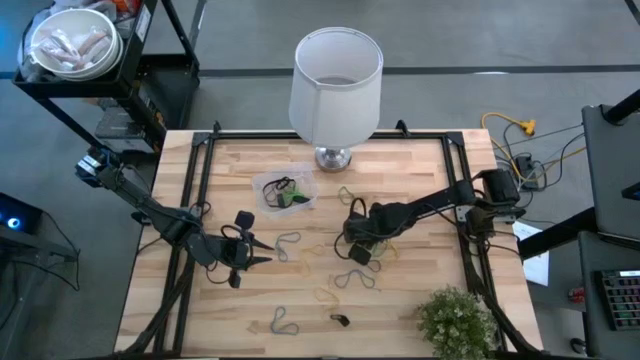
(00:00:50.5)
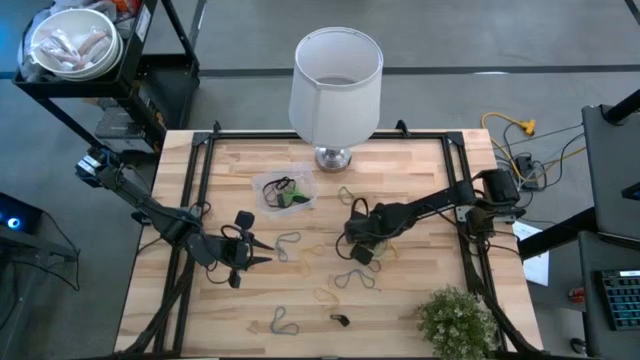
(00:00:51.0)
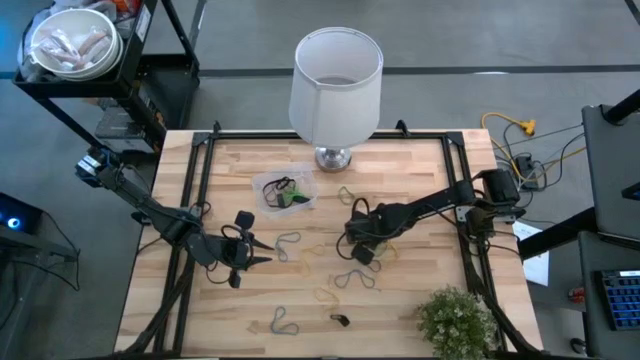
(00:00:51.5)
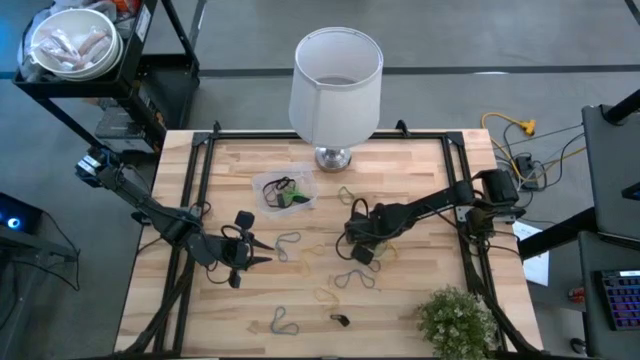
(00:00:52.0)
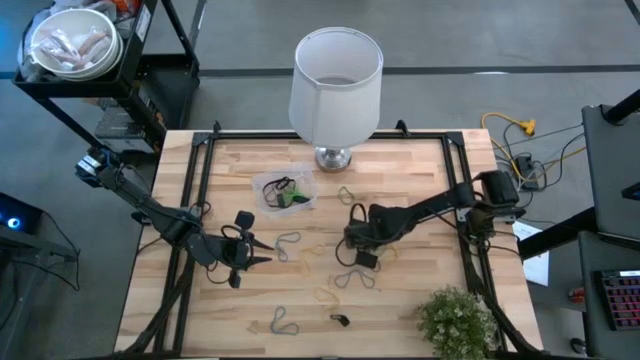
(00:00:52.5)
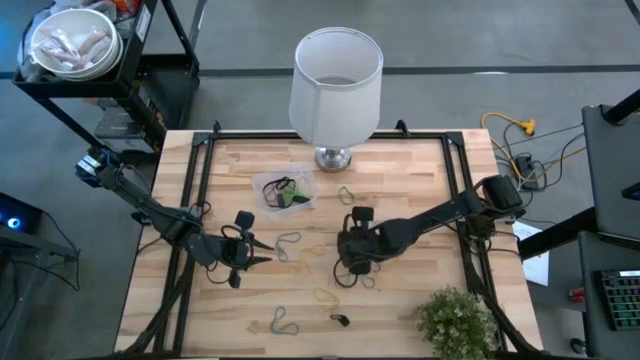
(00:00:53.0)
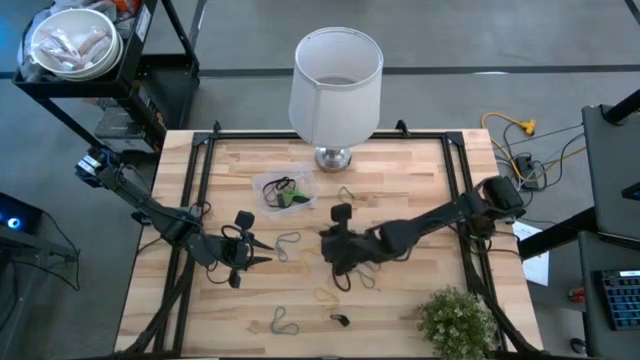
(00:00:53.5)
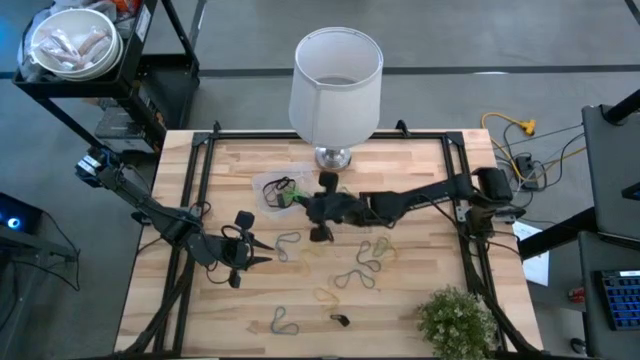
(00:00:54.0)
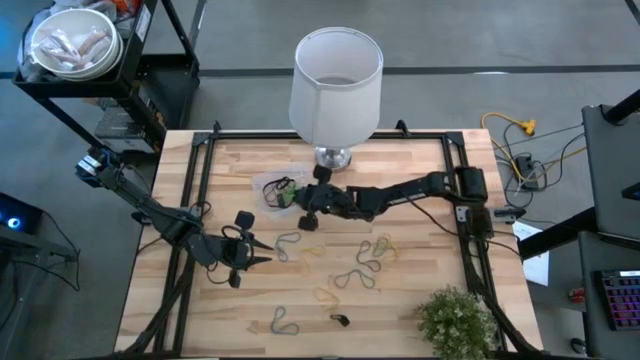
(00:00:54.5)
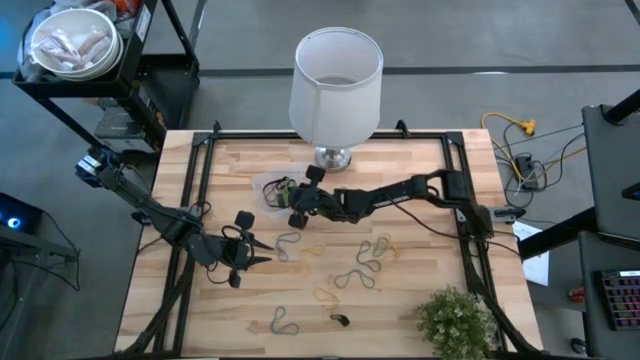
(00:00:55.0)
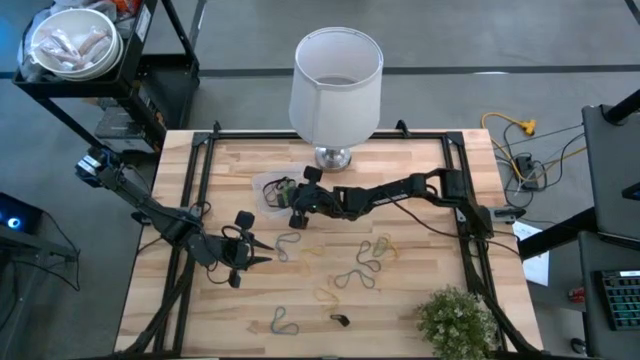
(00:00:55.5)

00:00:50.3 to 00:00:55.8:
Task: Pick and place rubber bands into bin
Put the green rubber band into the transparent bin

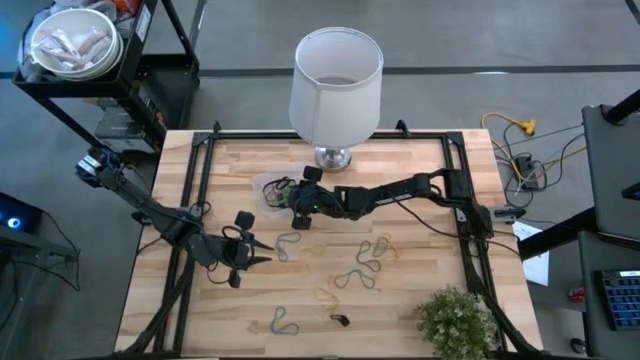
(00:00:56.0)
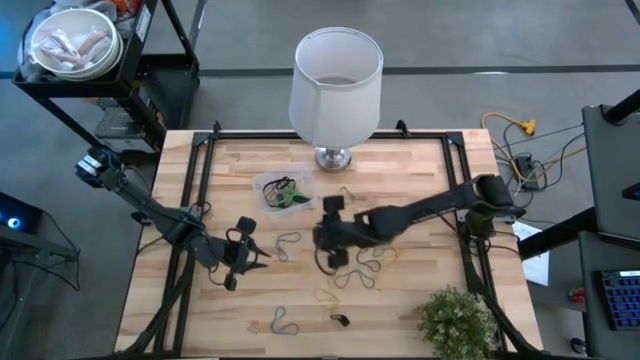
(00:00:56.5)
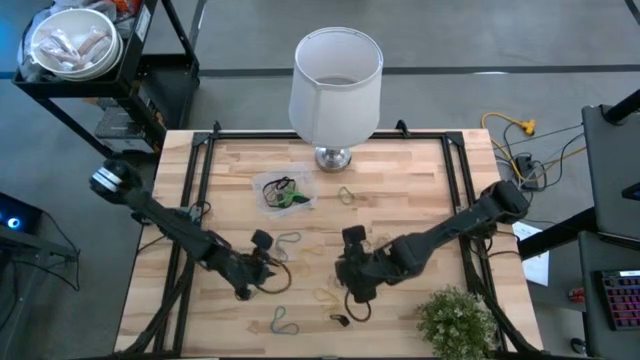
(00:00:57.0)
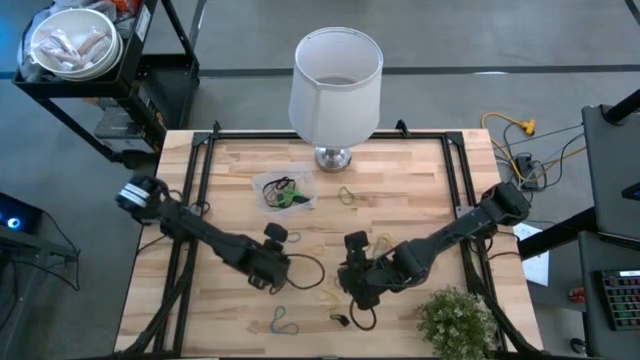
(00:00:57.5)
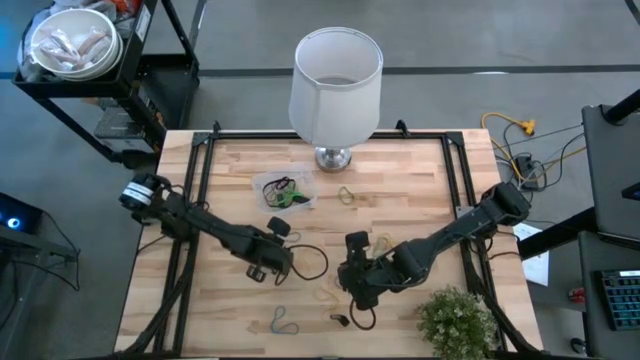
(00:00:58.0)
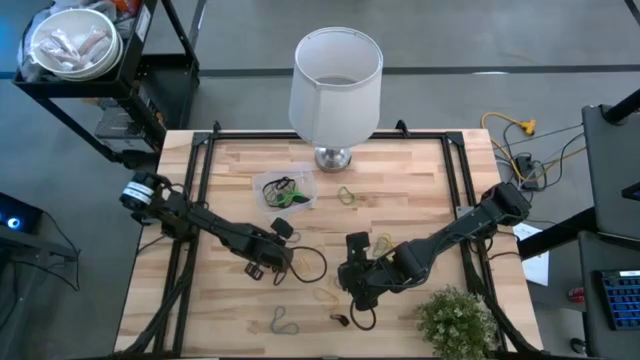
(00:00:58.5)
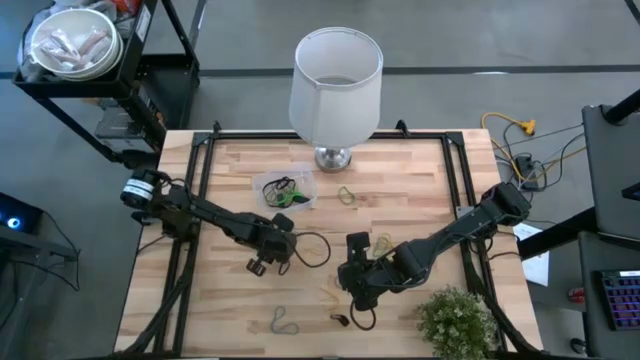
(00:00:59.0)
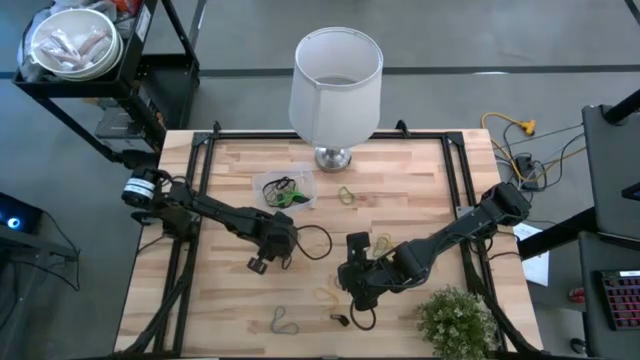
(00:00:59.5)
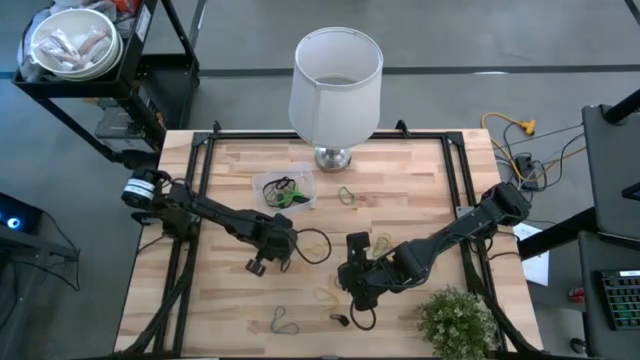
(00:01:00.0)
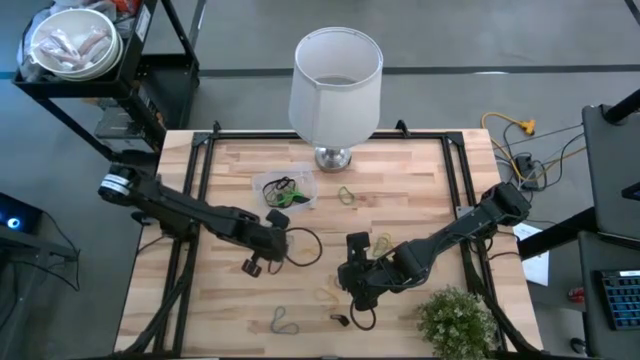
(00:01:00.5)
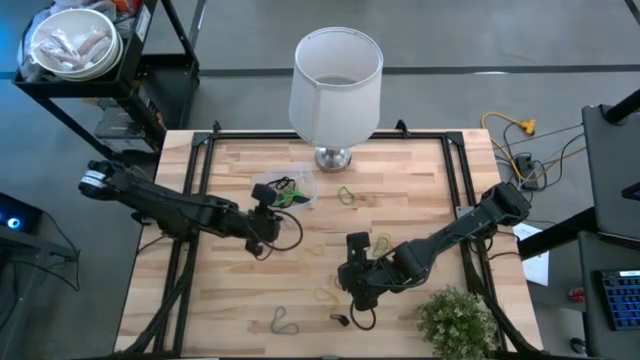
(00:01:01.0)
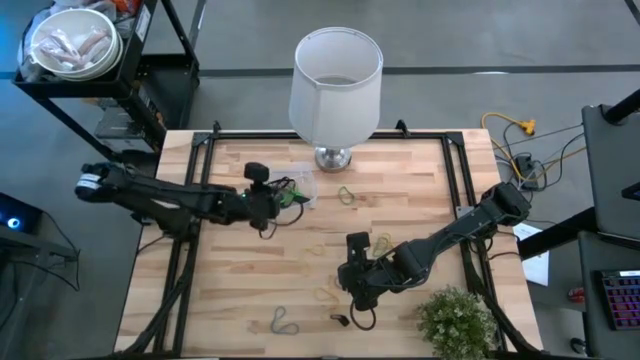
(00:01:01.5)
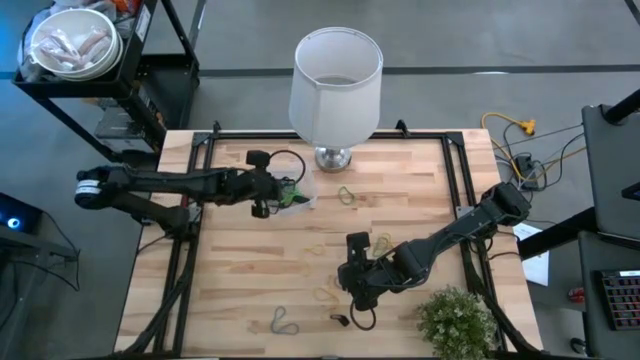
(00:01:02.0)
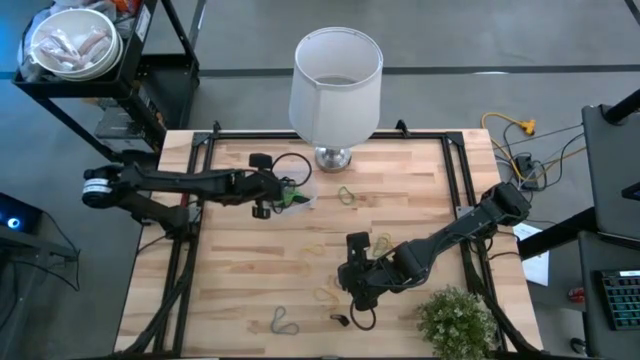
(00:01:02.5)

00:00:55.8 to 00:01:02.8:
Put the blue rubber band into the transparent bin

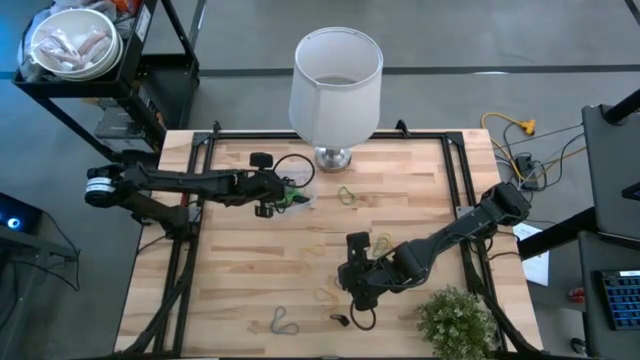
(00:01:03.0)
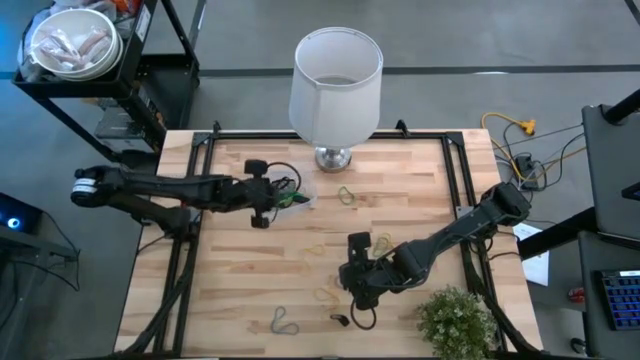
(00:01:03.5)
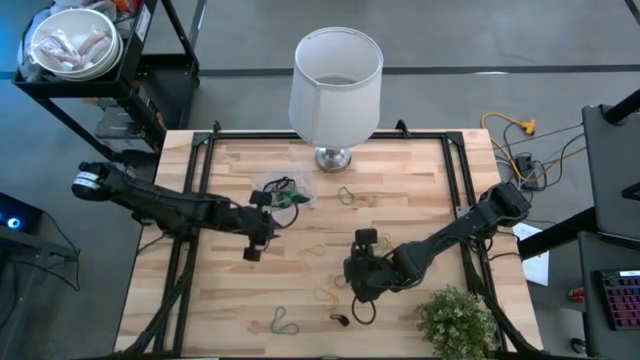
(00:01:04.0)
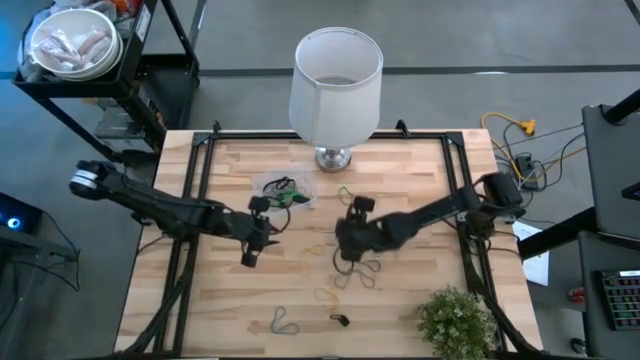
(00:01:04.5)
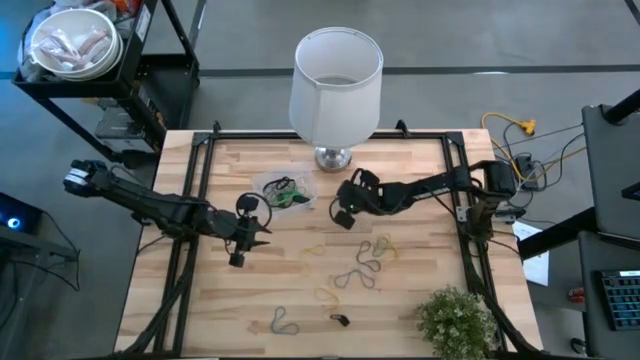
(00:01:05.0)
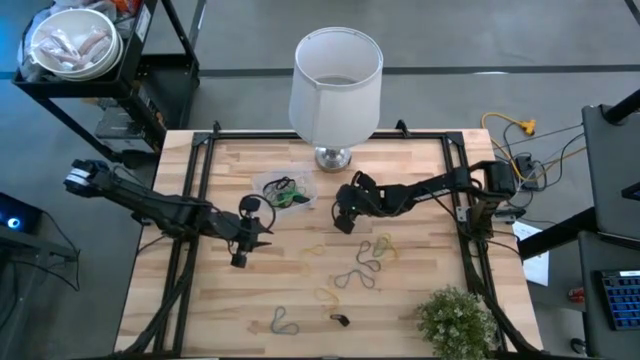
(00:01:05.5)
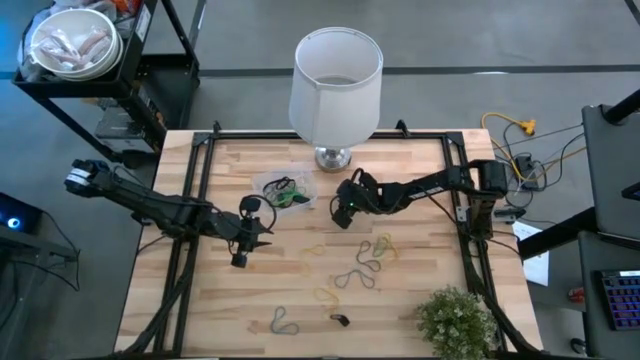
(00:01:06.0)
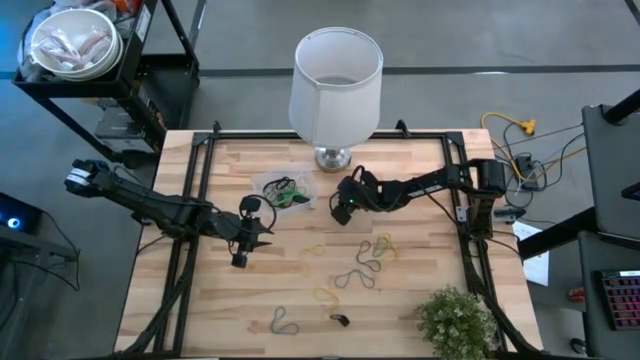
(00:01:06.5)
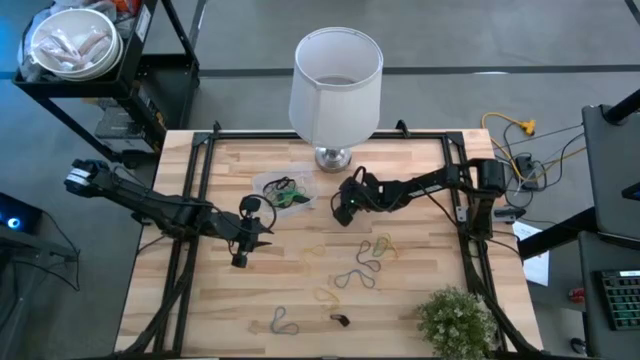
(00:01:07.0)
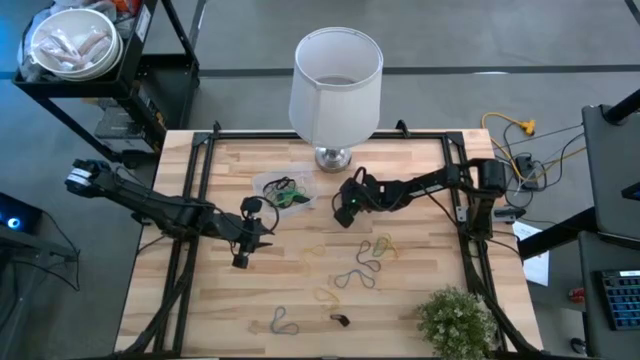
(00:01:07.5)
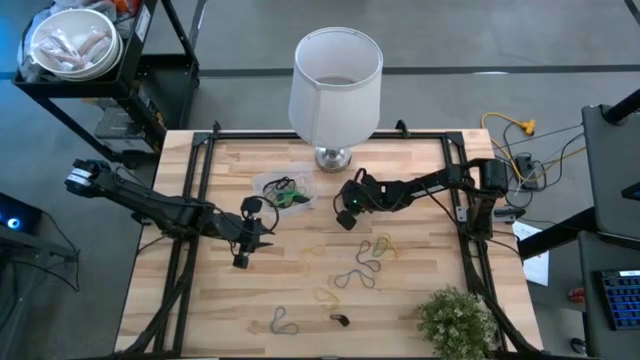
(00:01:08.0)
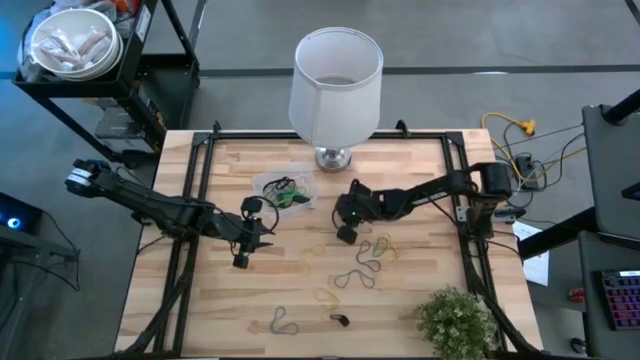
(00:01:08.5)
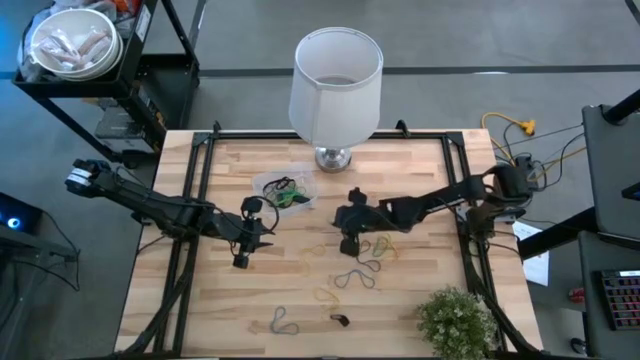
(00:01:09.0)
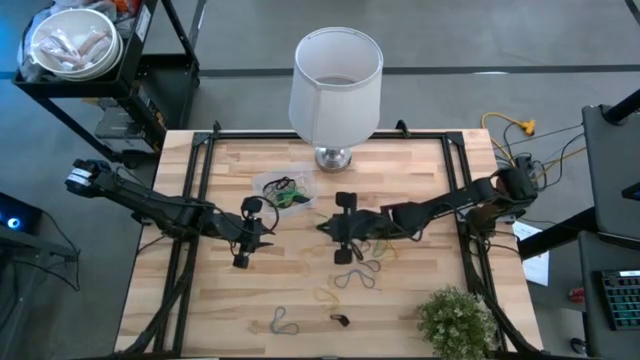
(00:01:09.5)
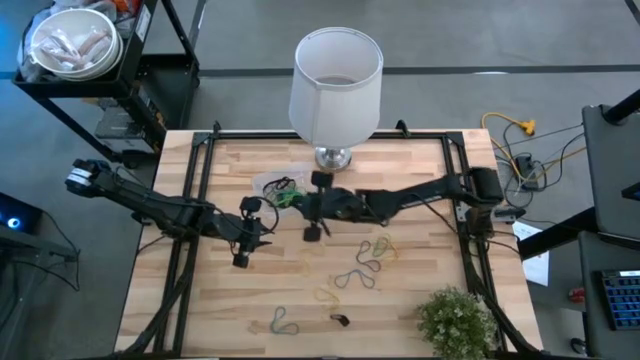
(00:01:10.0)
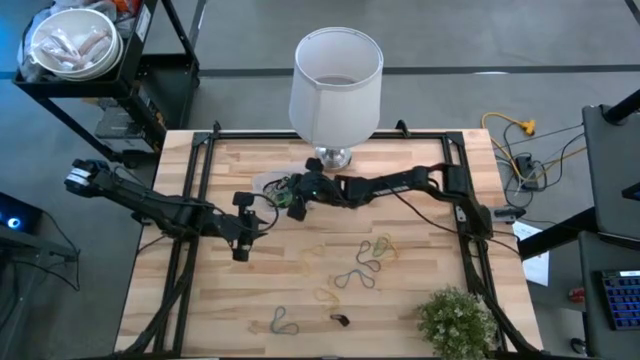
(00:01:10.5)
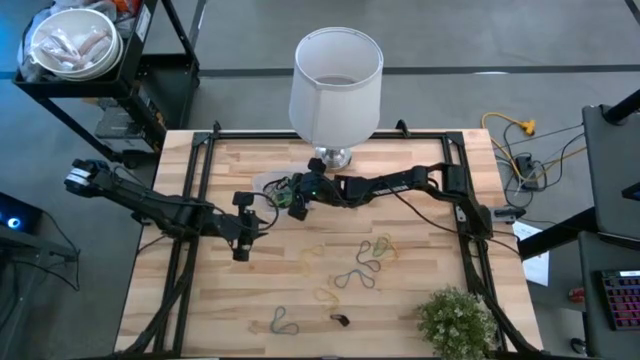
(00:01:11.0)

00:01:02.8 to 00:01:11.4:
Put the green rubber band into the transparent bin
